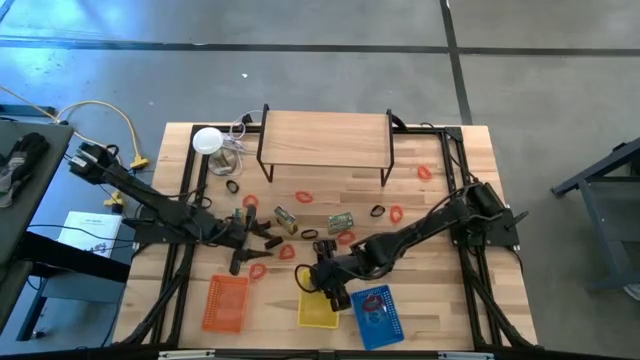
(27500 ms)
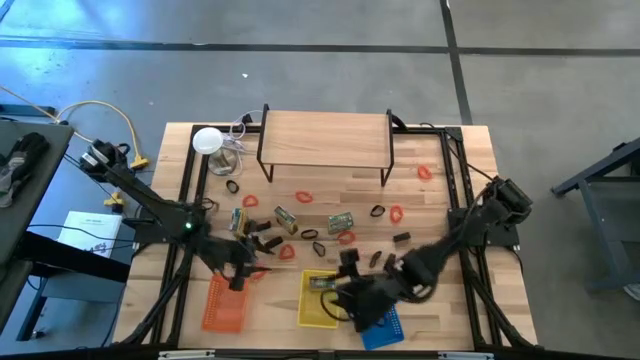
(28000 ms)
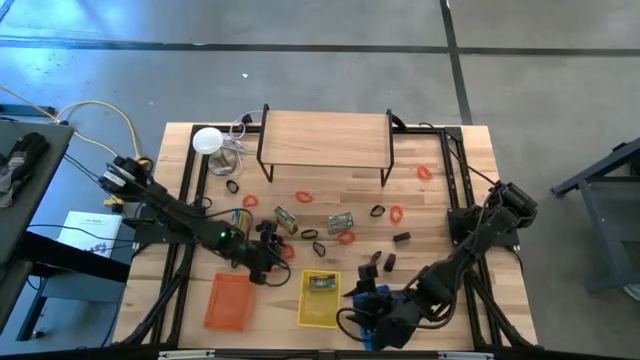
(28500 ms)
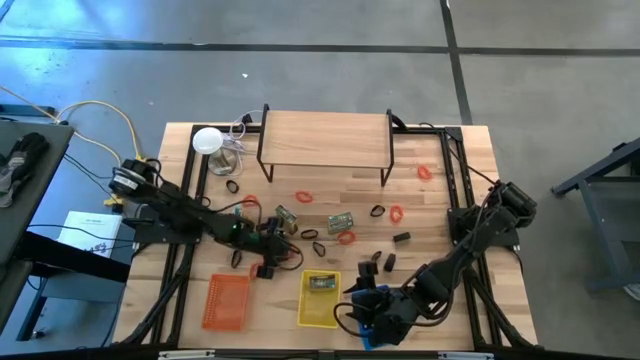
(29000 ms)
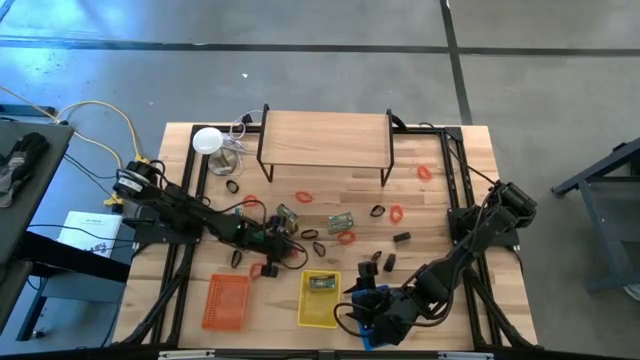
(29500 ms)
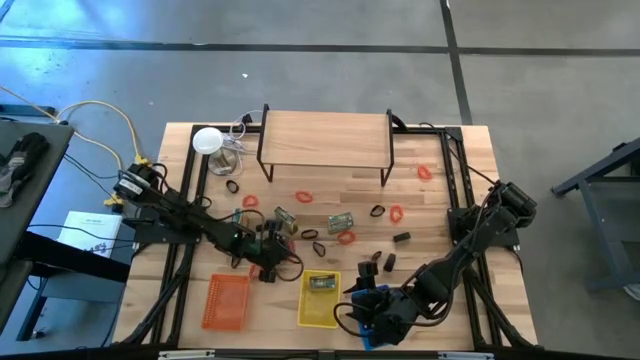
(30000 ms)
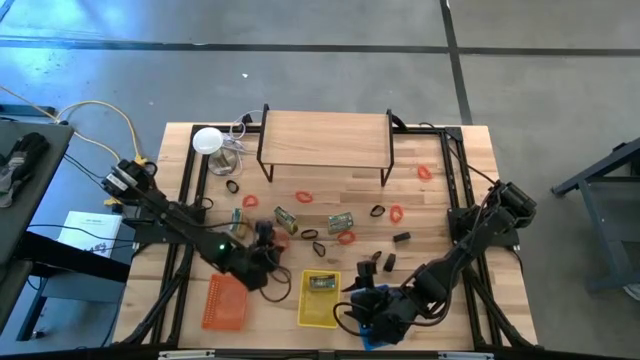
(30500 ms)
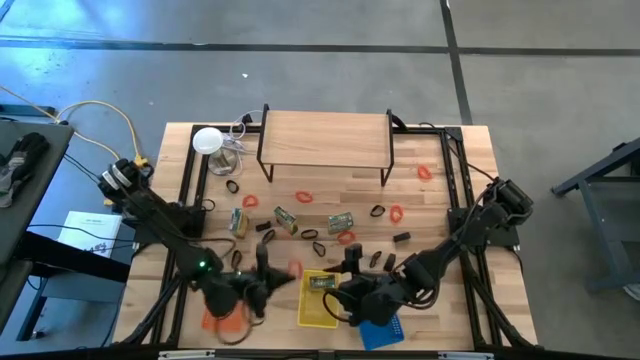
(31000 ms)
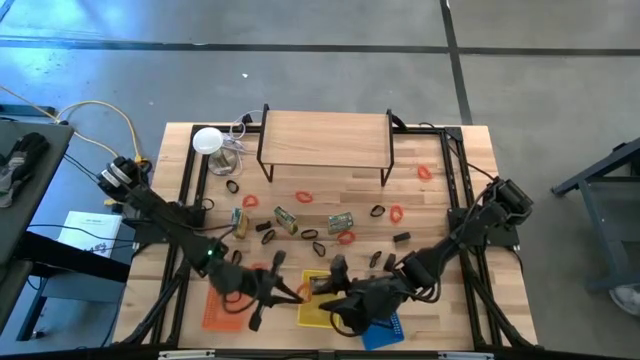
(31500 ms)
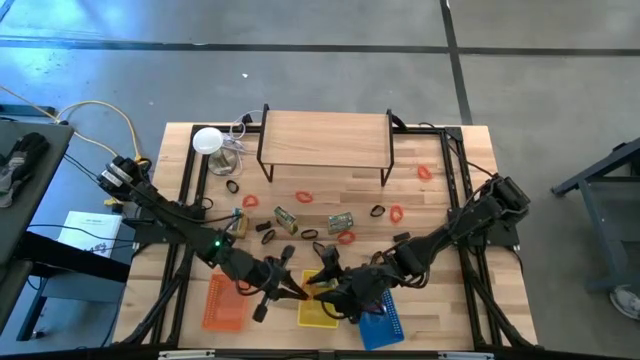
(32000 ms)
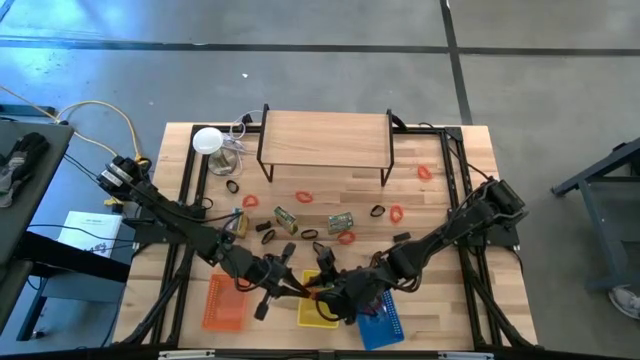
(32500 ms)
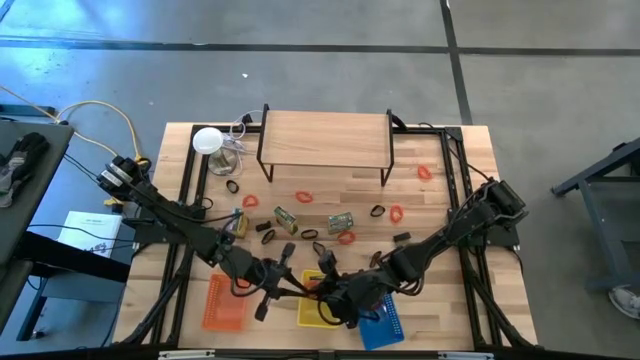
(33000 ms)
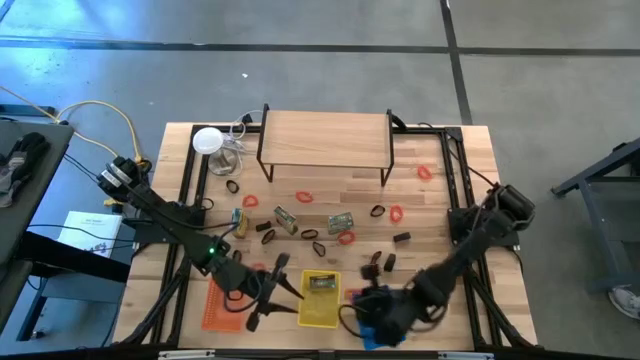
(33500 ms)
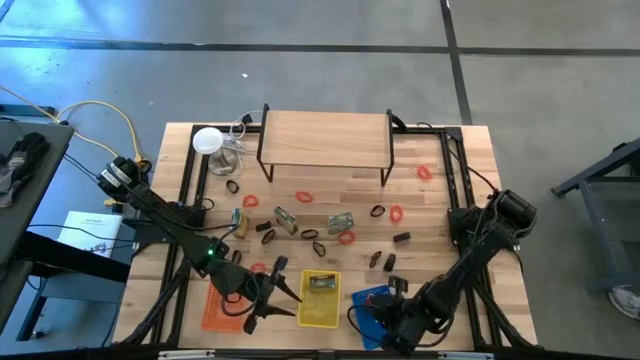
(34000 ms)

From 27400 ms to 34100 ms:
Task: Pick & Place Office Desk Supplies
Put the orange spring keychain into the blue bin

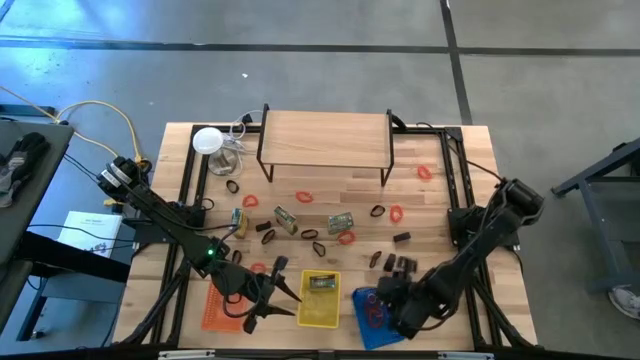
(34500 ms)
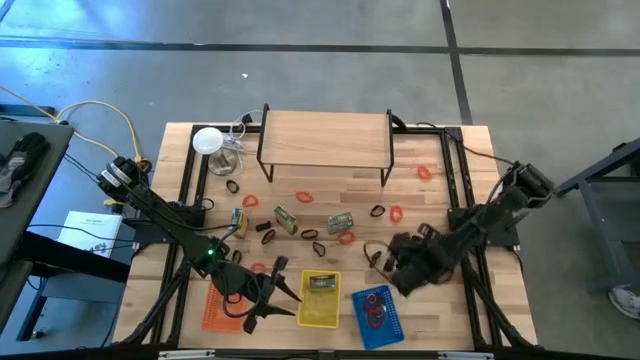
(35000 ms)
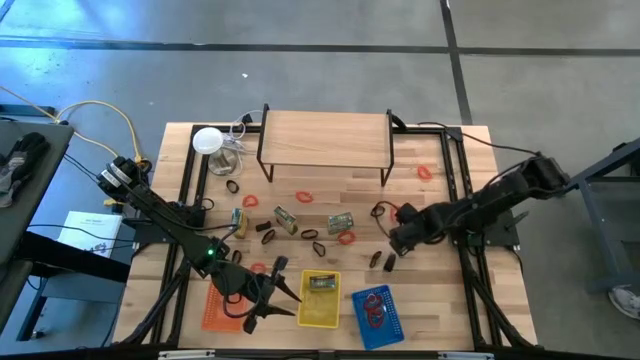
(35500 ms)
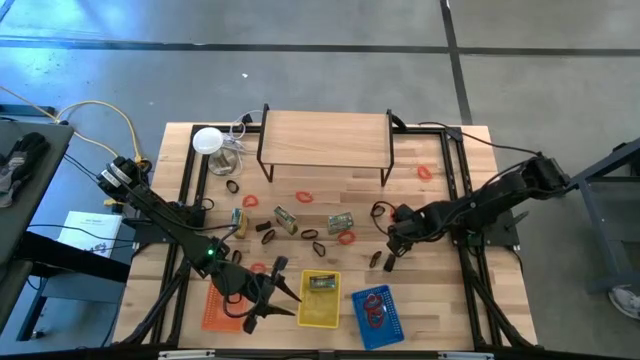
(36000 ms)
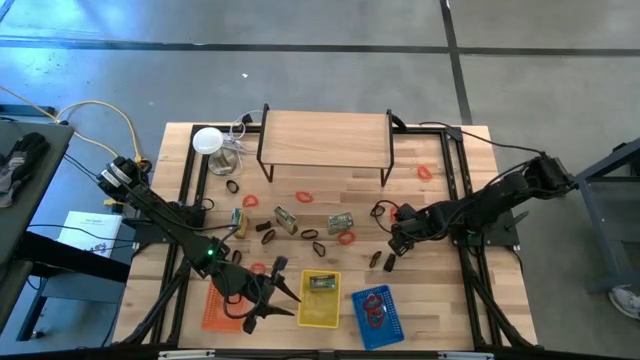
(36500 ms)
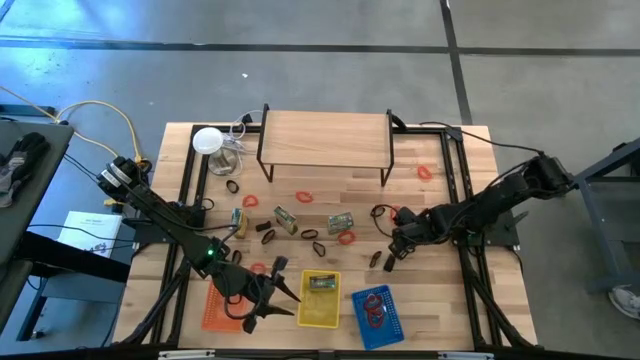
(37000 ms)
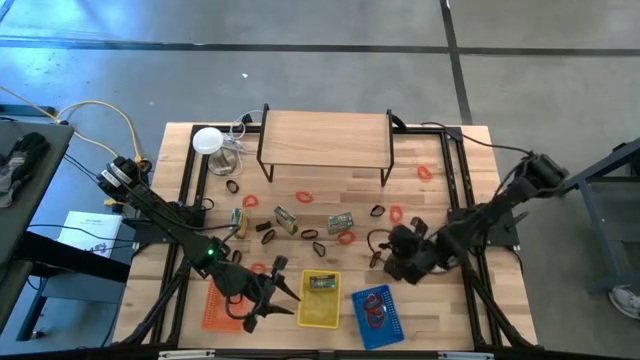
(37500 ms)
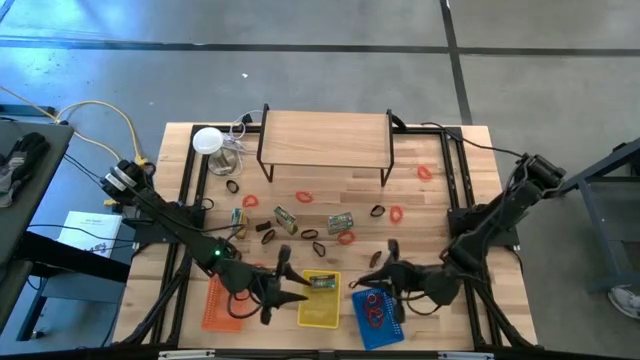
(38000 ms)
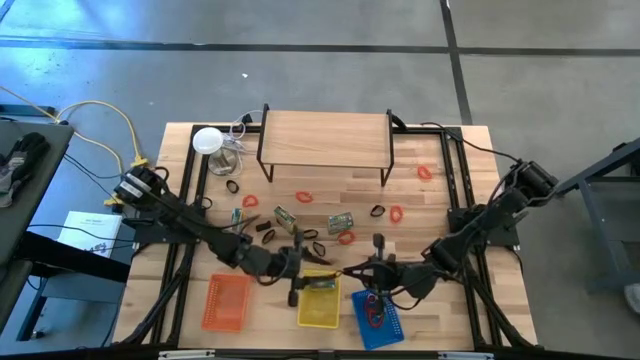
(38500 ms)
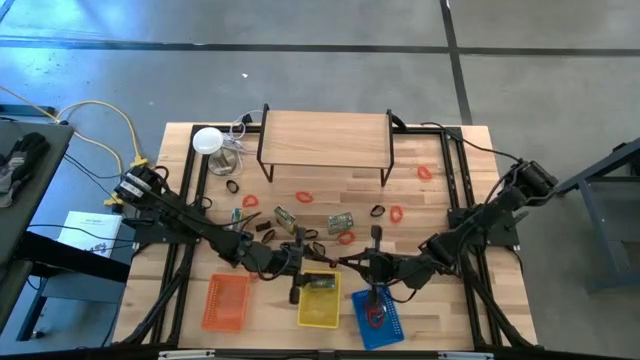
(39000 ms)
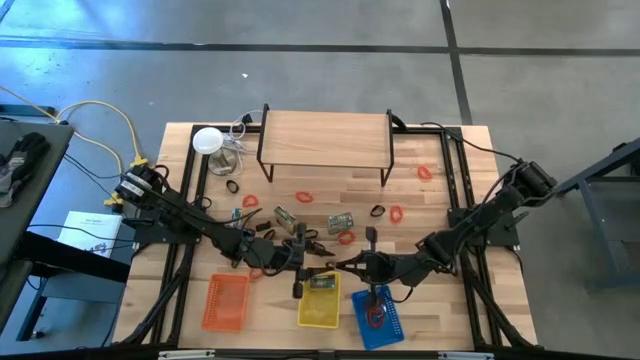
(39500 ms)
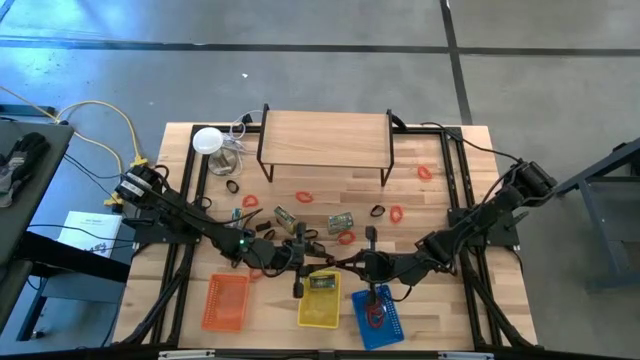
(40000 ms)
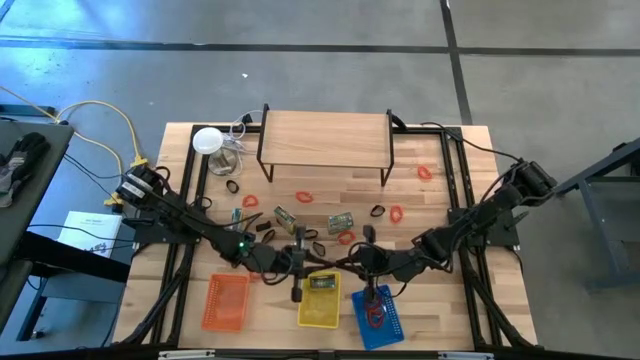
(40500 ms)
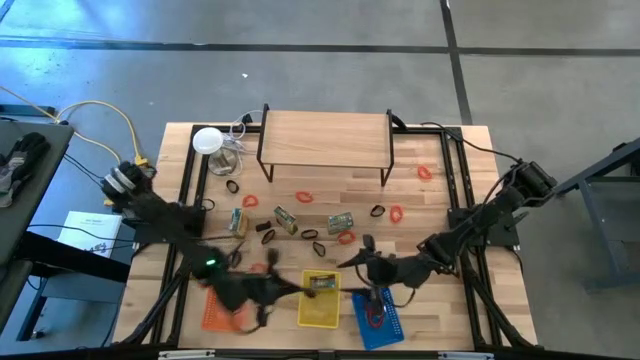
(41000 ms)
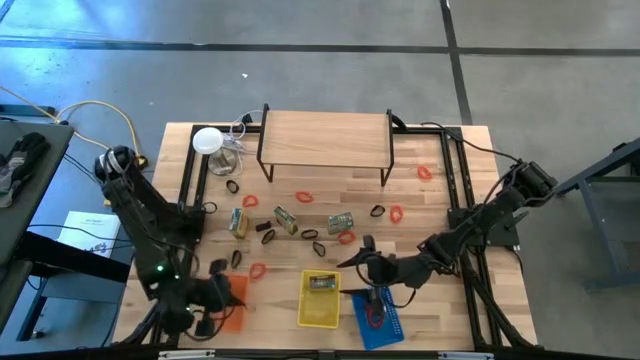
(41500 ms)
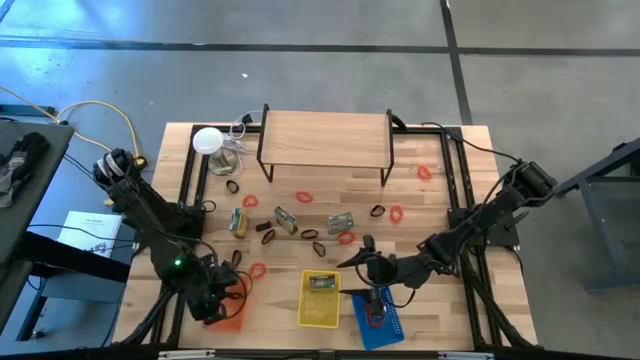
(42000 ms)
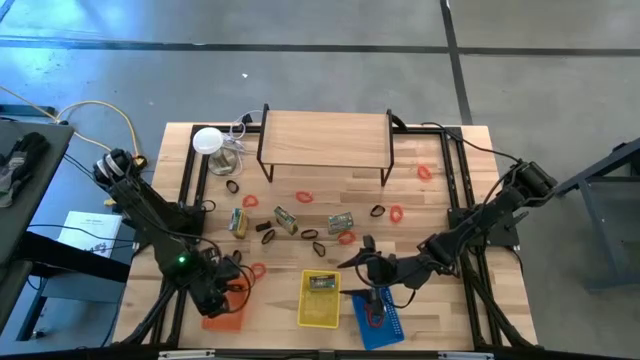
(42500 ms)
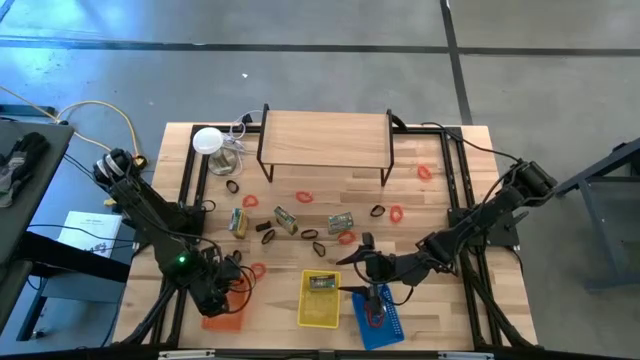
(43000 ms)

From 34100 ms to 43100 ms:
Put the black rubber band into the orange bin

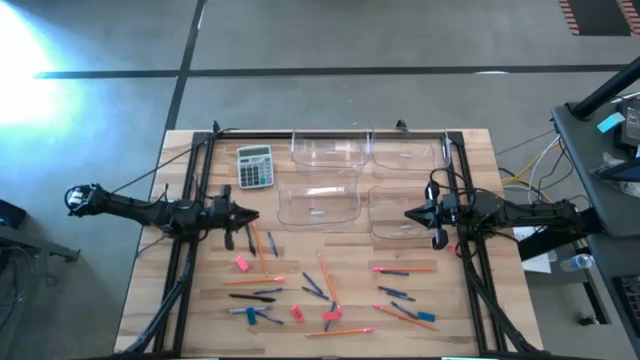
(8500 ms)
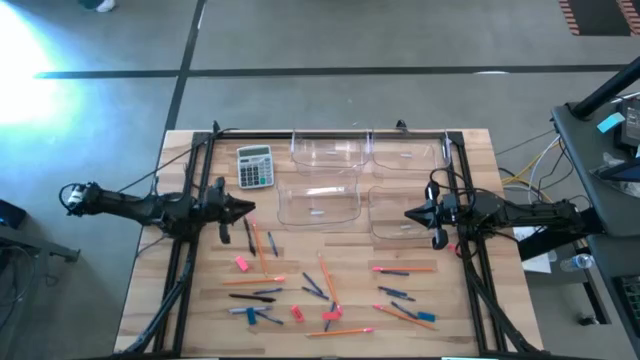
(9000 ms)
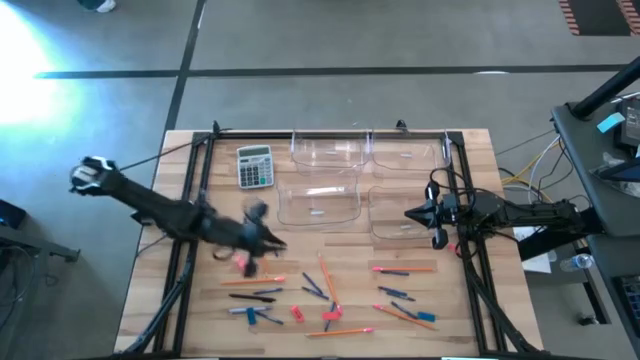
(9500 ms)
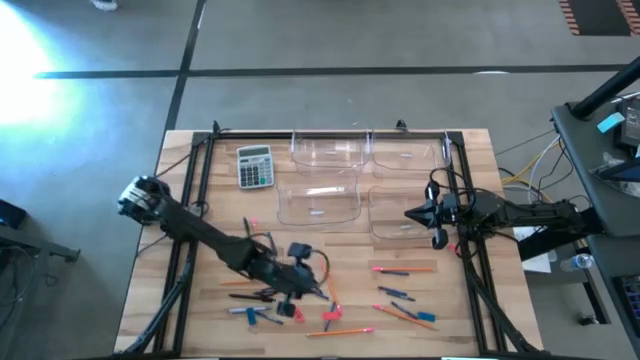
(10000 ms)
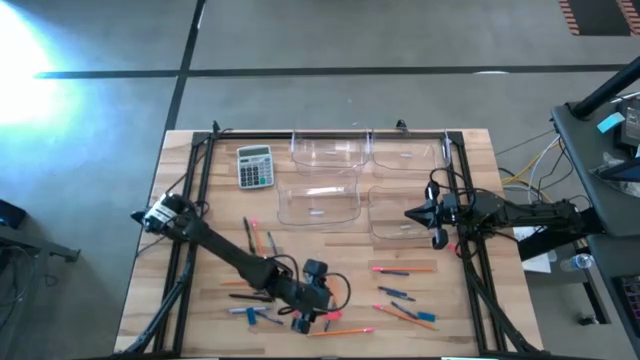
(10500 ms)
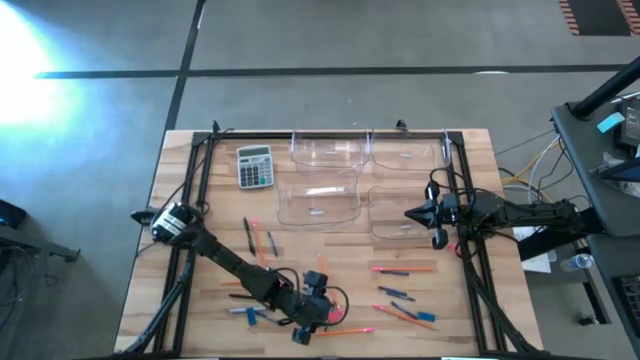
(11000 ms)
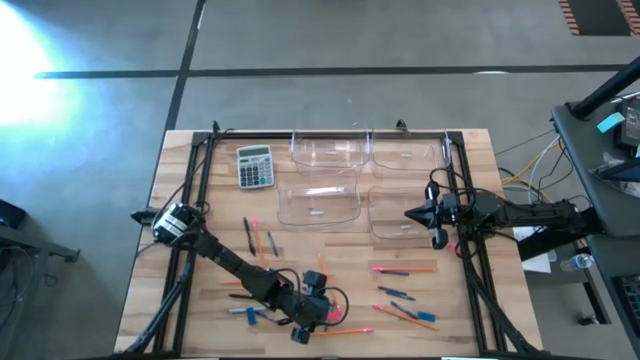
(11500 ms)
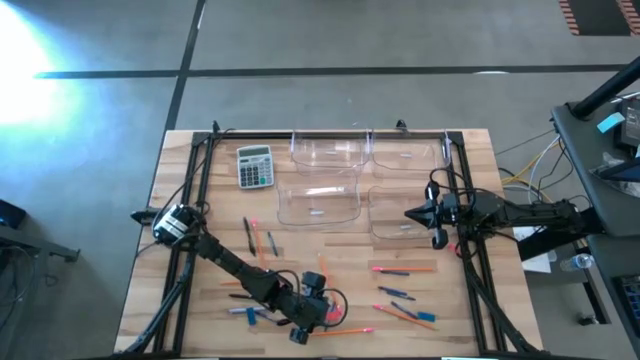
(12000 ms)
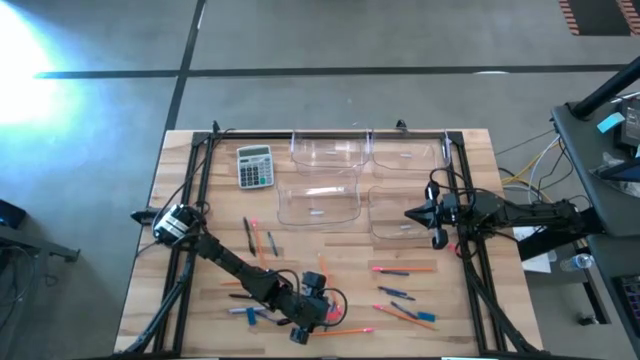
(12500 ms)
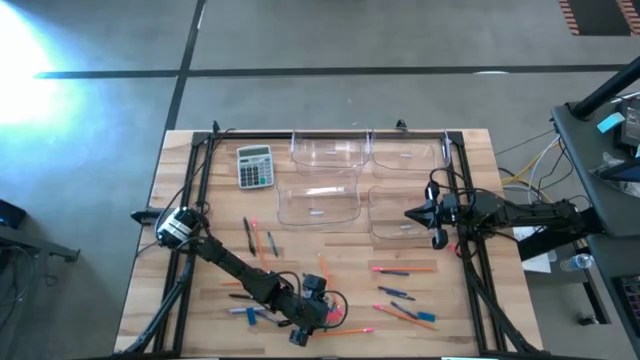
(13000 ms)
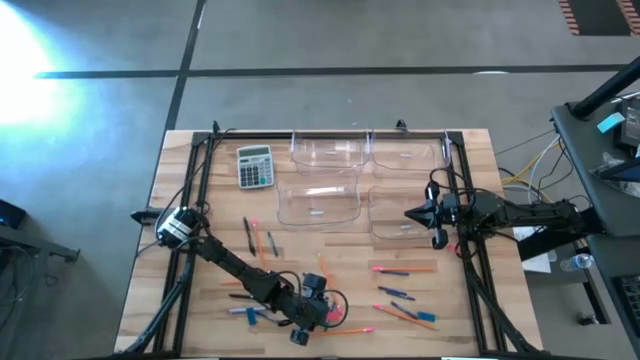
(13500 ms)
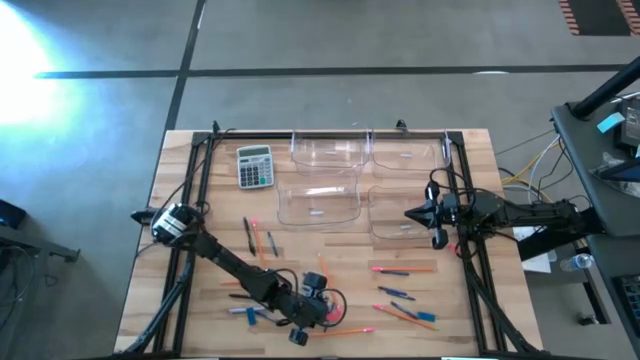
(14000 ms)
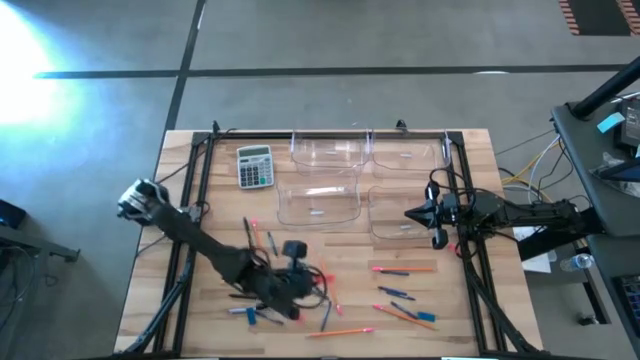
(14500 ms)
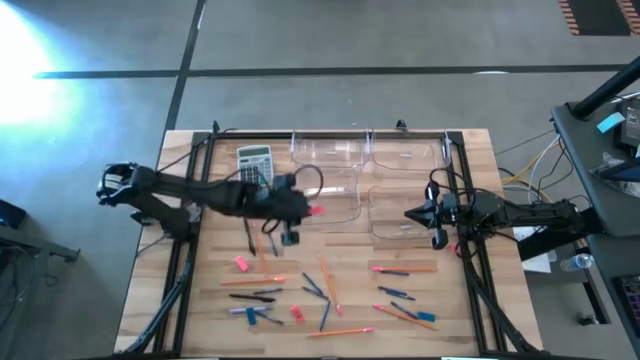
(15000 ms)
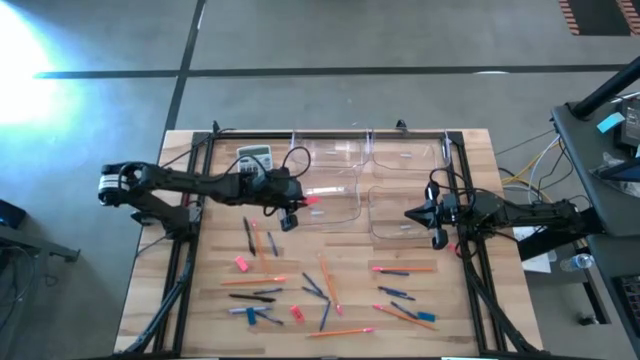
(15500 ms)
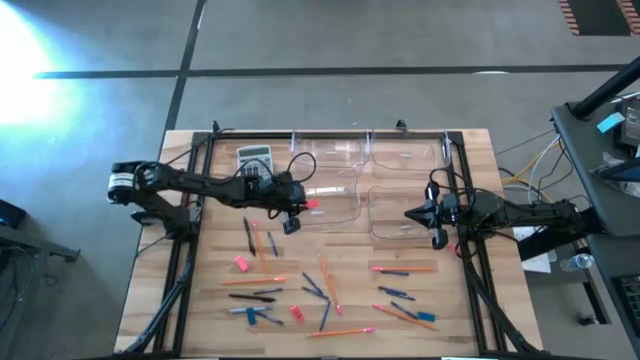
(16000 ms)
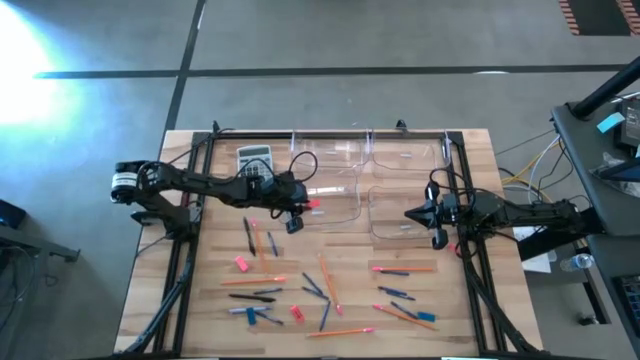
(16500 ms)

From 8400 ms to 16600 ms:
Task: Sort crayons/erasers/pens/pencils in bins
Put the orange eraser into the bottom left transparent bin
